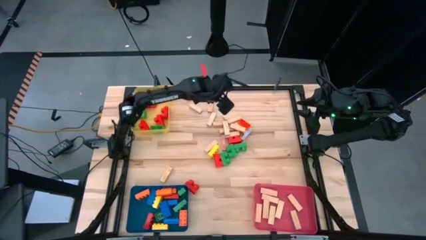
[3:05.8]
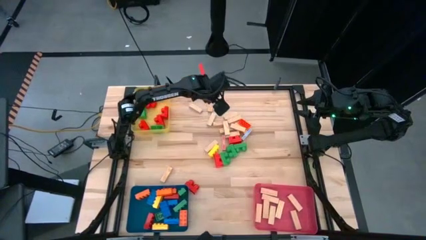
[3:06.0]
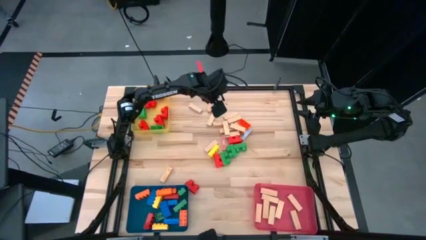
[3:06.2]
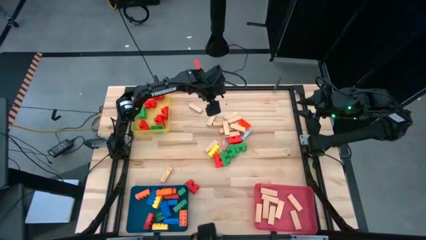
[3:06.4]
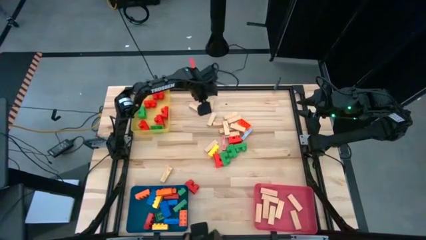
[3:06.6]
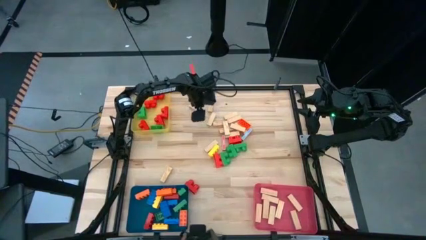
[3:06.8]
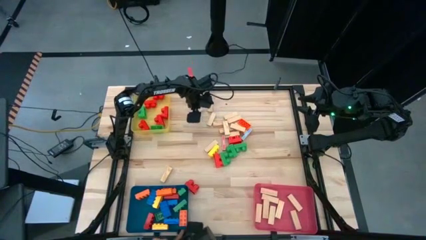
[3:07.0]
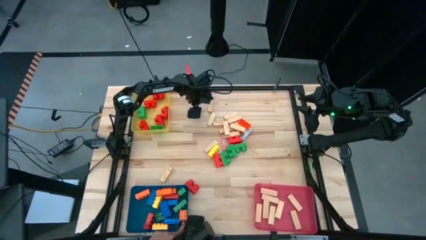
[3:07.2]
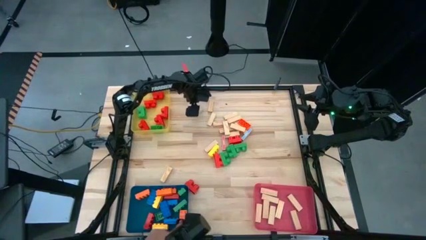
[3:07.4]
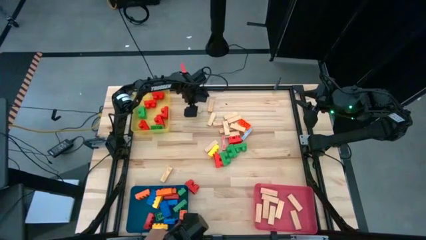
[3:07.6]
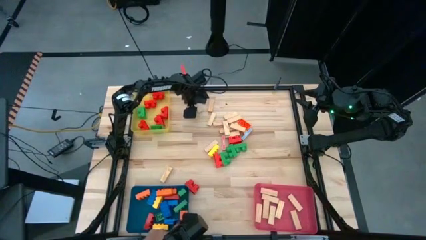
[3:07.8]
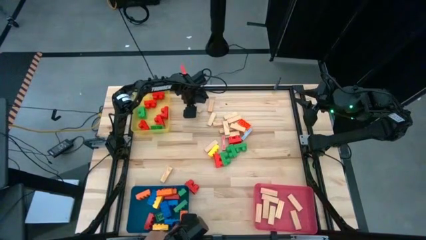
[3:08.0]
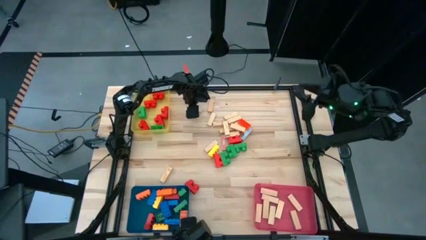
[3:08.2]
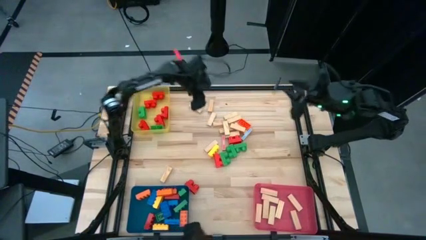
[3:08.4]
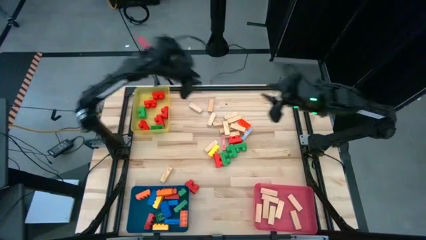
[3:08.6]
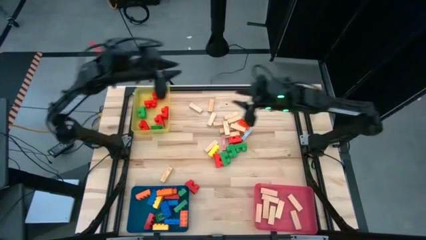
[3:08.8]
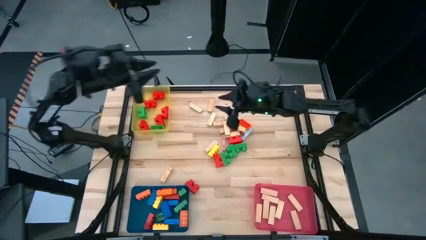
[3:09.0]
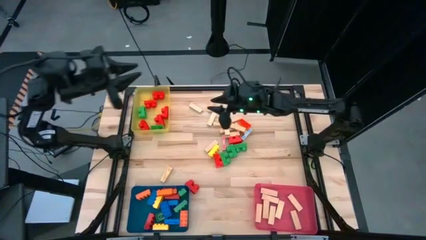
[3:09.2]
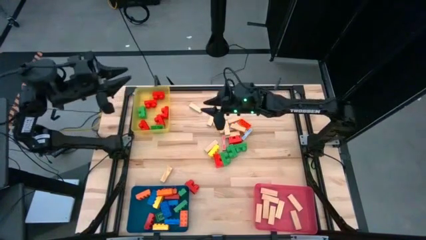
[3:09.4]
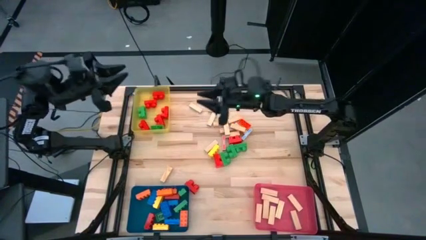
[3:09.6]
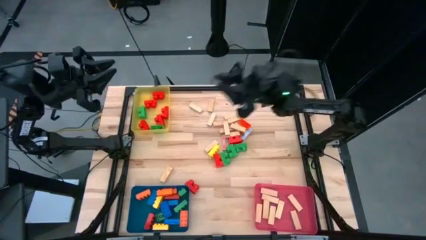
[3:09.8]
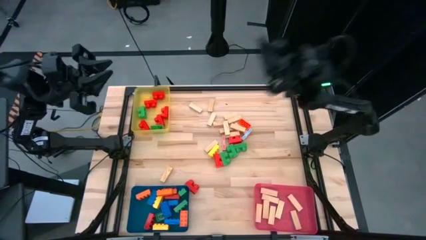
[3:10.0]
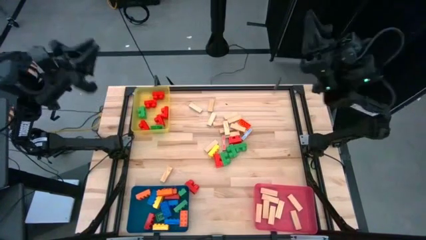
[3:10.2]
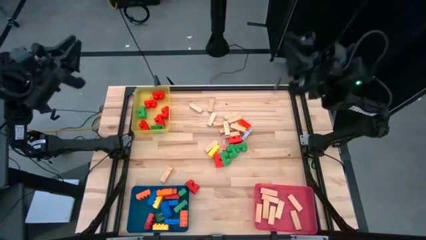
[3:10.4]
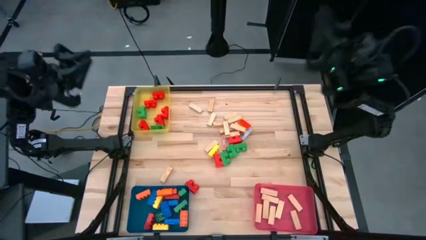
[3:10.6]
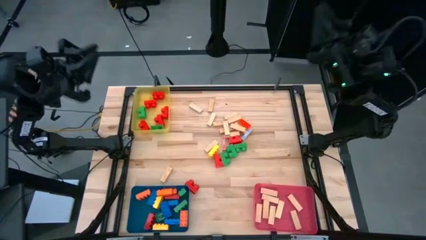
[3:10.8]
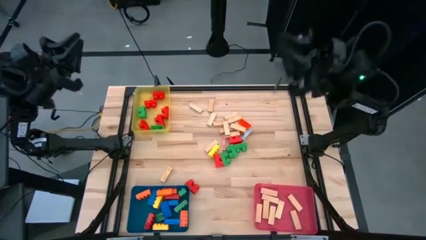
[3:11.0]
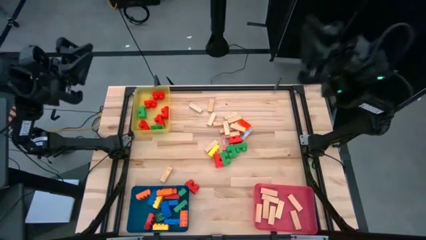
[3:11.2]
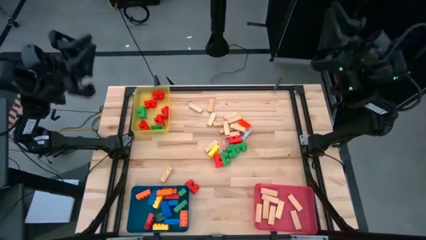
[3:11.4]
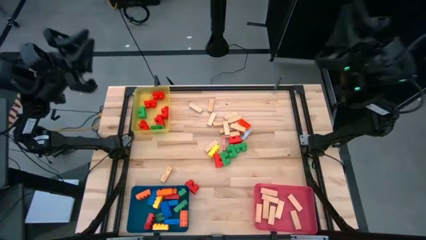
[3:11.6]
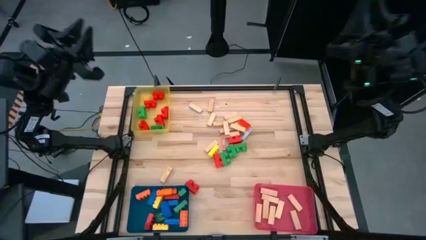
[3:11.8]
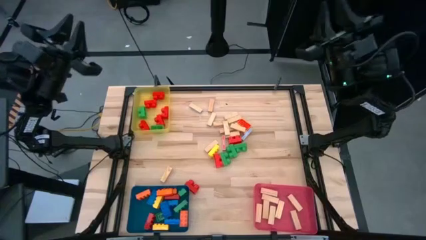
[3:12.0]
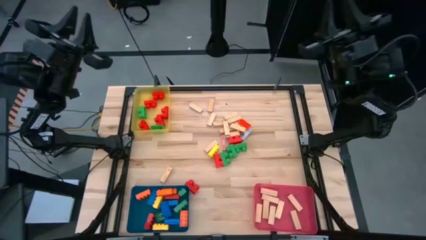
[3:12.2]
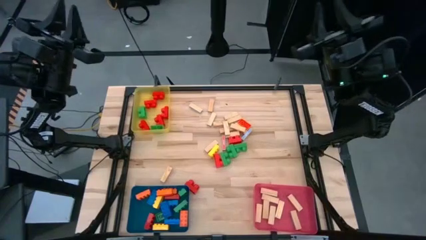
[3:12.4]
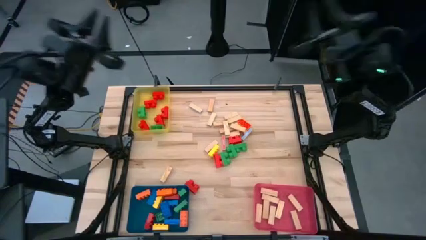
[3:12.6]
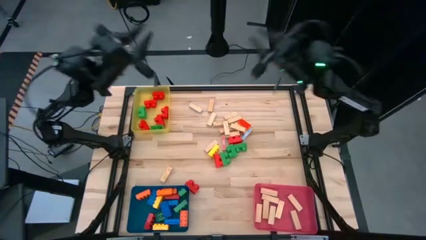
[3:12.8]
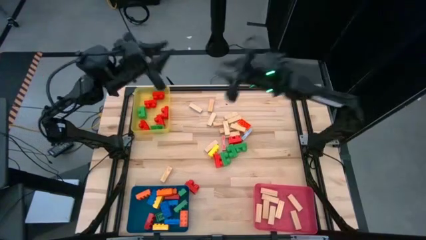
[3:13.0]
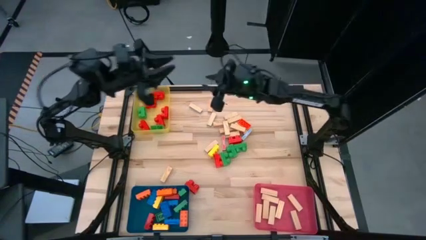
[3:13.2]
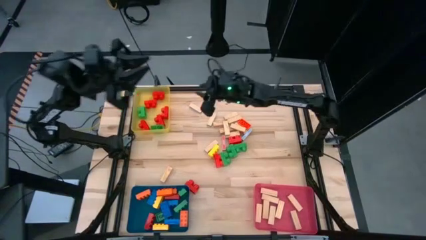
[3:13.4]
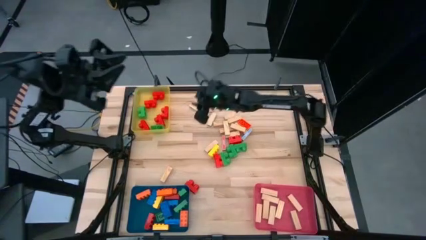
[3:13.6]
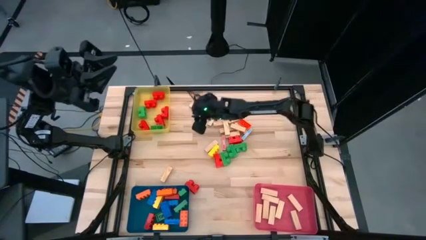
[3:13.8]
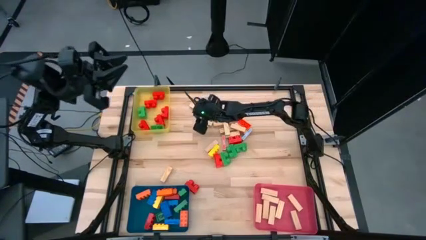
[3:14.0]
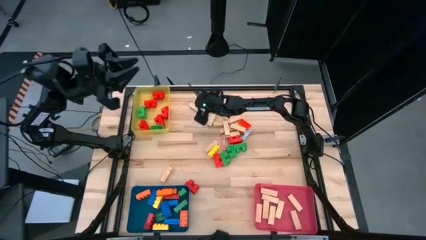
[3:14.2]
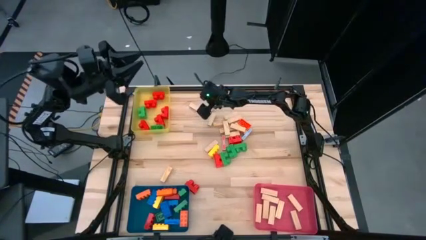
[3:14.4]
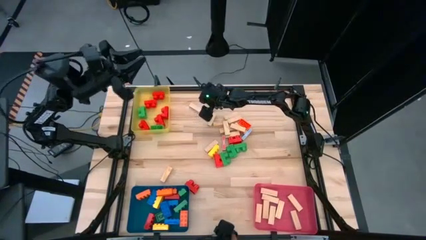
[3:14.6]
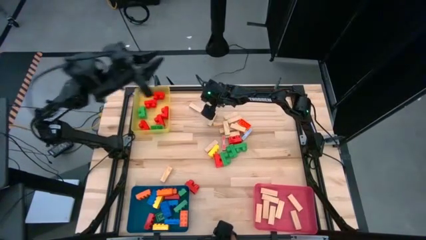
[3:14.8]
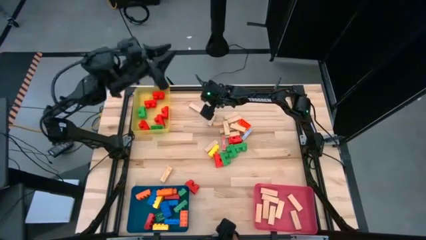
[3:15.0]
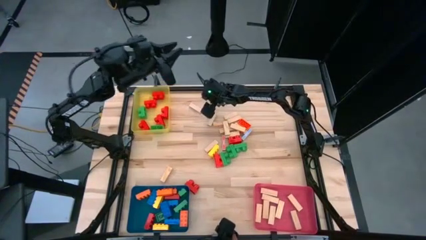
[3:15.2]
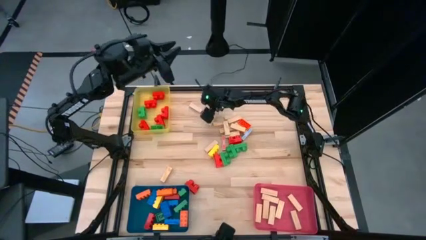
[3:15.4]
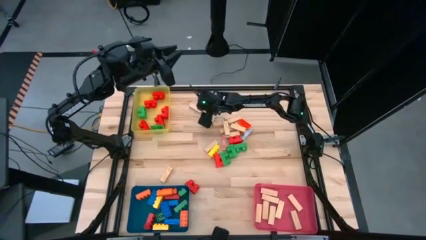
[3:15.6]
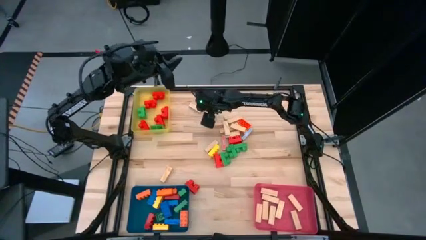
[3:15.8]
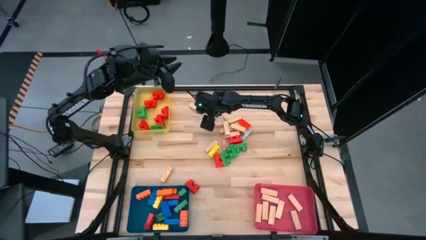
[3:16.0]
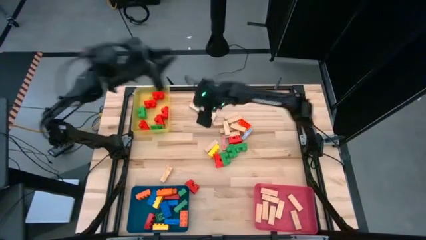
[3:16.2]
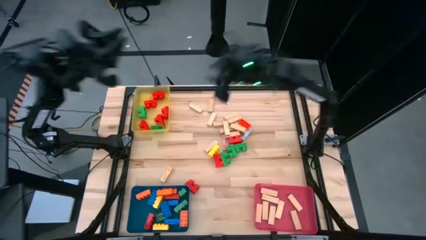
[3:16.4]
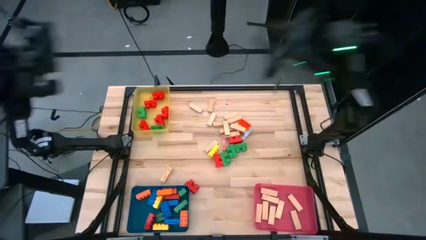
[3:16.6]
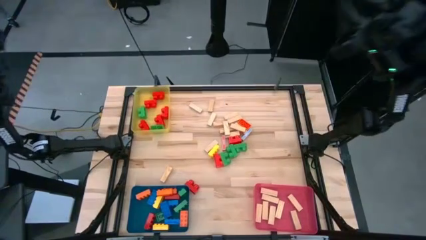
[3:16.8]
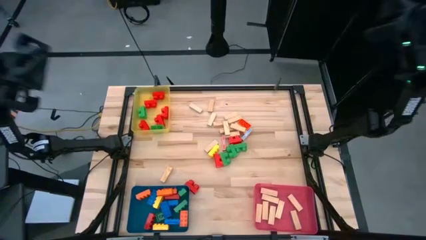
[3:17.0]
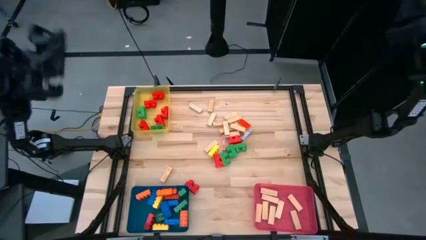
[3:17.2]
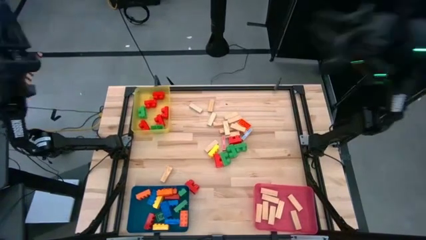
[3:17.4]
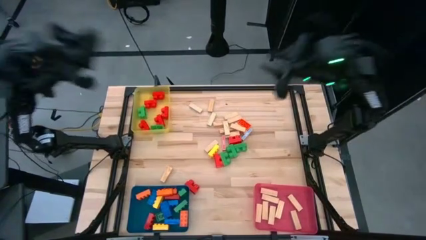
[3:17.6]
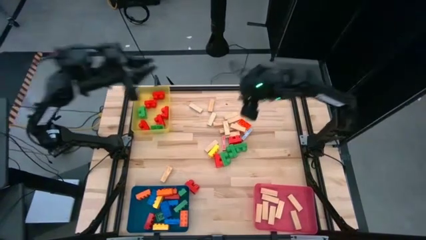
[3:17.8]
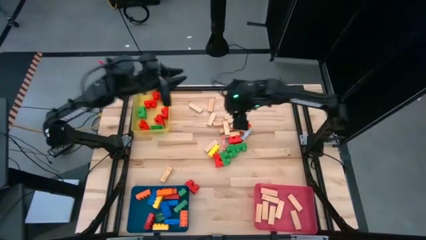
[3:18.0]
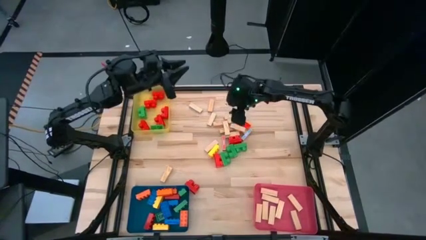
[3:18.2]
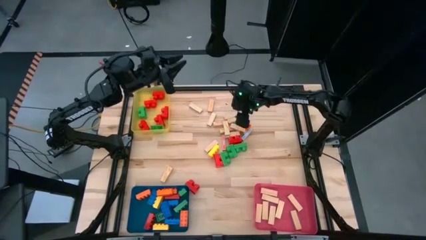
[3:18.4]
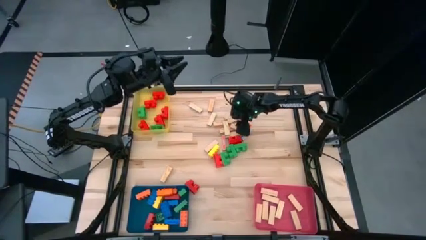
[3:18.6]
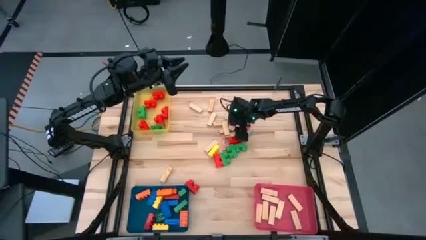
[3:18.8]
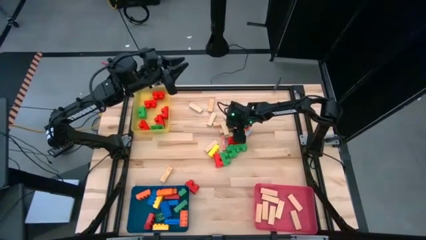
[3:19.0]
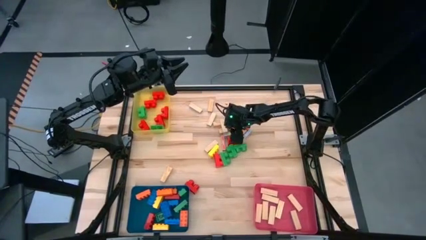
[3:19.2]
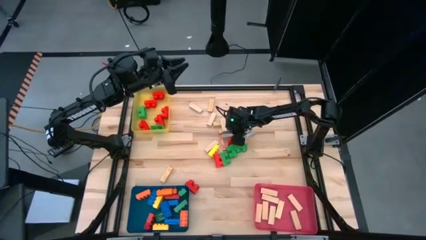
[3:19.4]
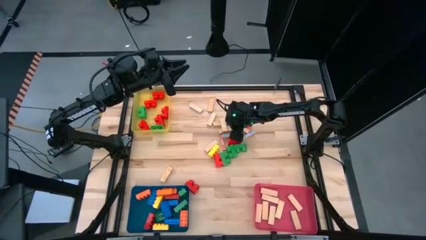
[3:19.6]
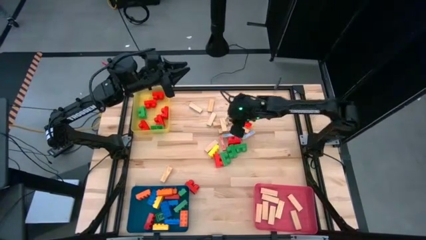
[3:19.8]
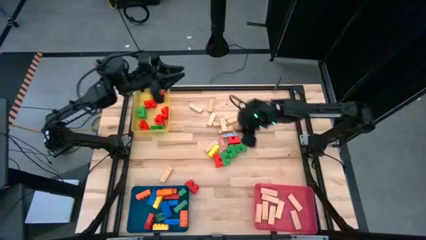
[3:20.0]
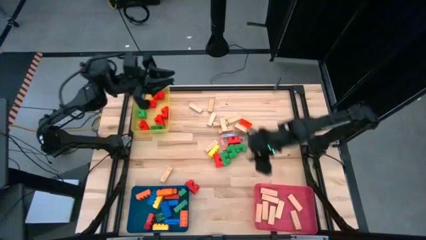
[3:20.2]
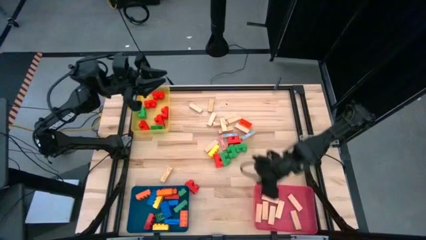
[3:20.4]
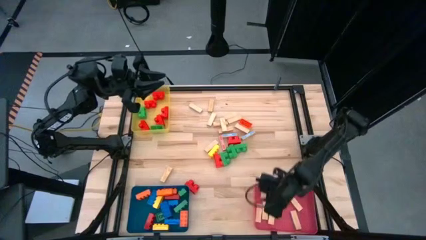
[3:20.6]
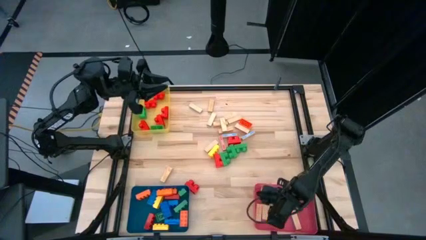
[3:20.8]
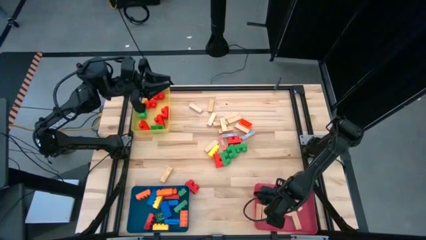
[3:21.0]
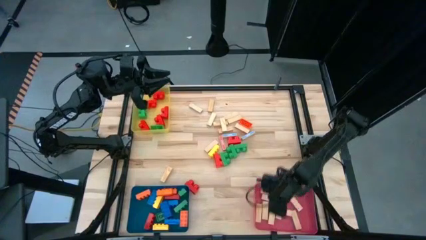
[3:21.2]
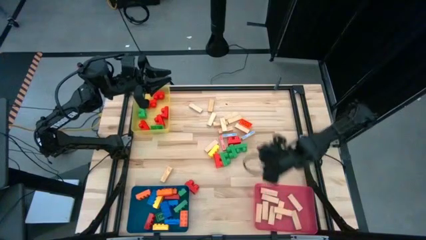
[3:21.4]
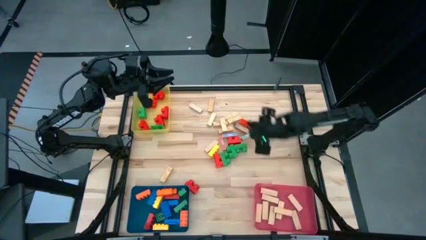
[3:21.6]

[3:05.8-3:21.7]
Task: Sort blocks by size
Put the wooden block into the red bin

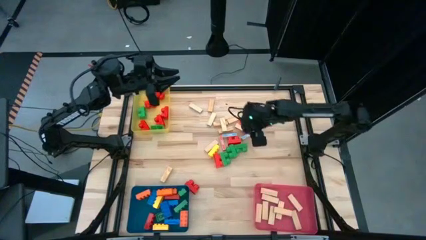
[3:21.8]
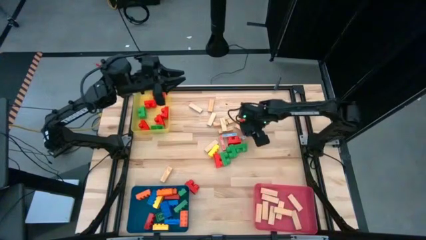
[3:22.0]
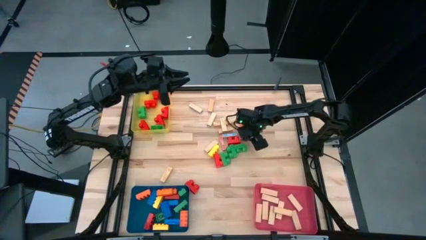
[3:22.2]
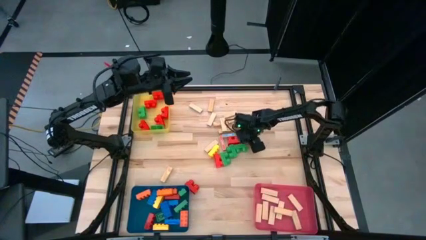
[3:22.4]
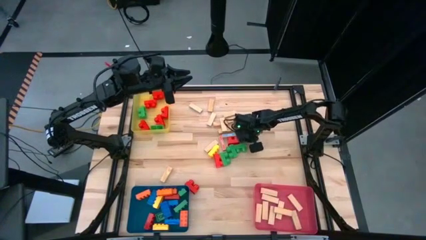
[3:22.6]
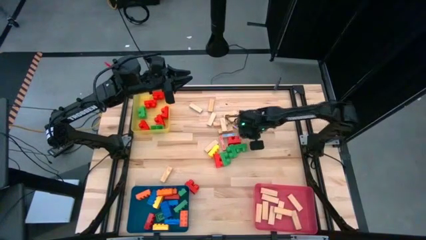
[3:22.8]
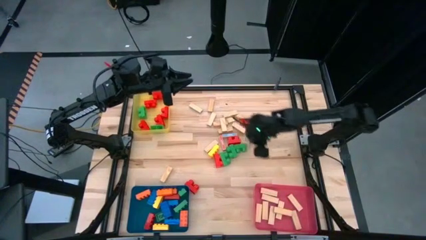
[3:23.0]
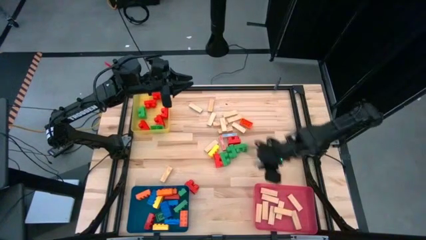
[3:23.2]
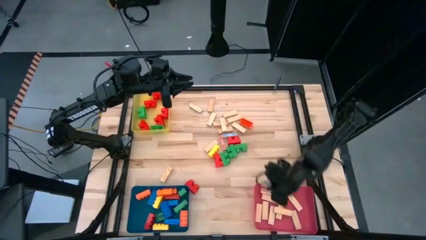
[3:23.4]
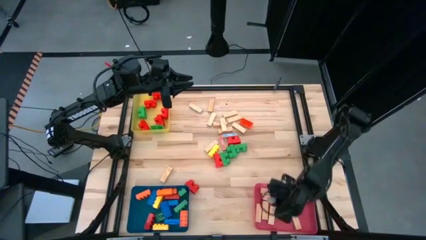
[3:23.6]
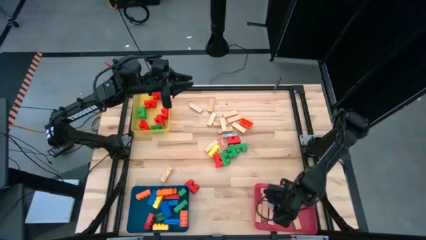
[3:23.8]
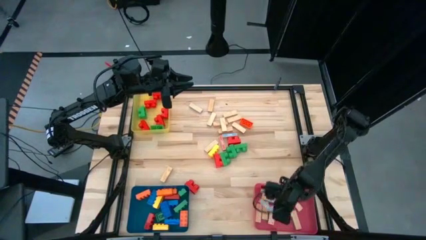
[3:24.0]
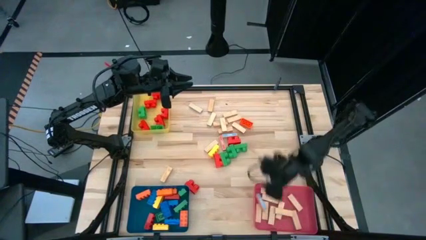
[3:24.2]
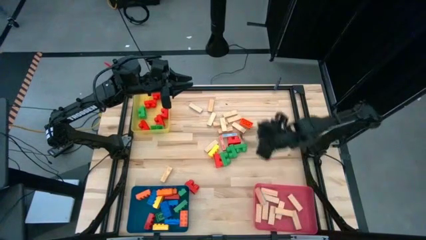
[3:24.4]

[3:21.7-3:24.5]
Put the wooden block into the red bin
